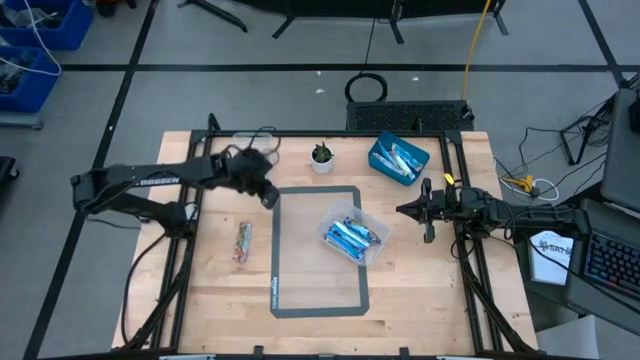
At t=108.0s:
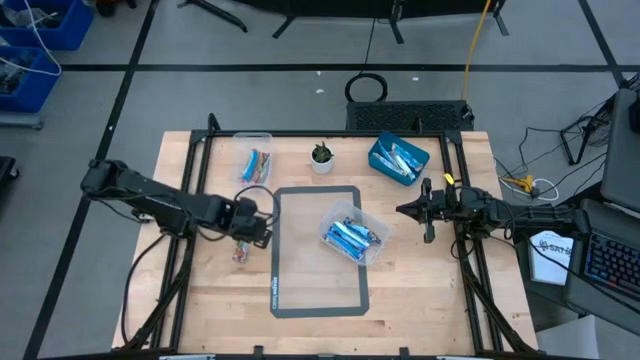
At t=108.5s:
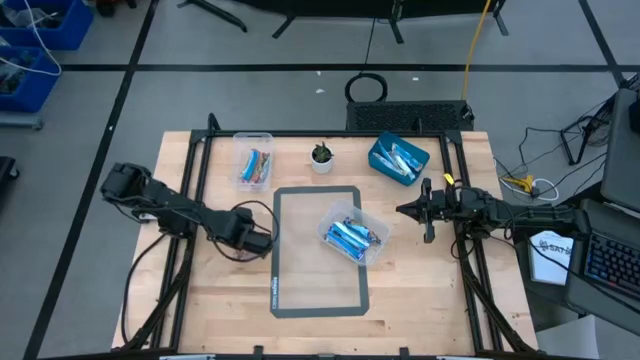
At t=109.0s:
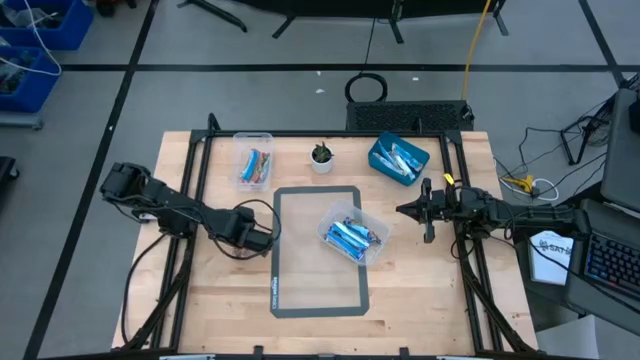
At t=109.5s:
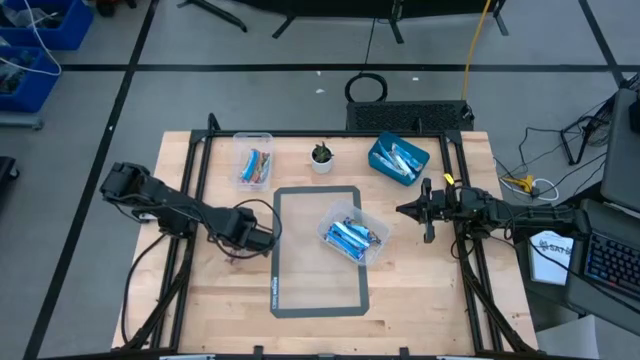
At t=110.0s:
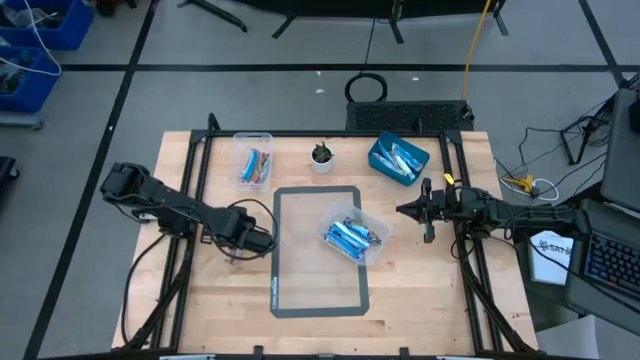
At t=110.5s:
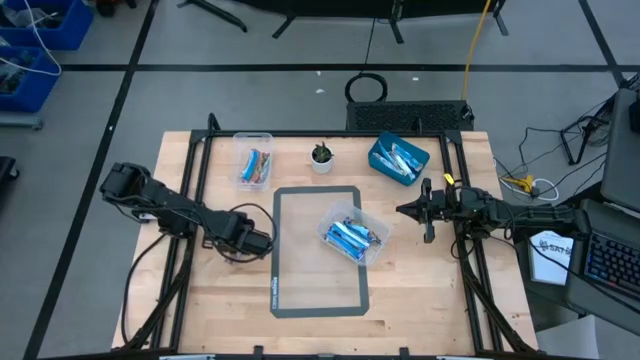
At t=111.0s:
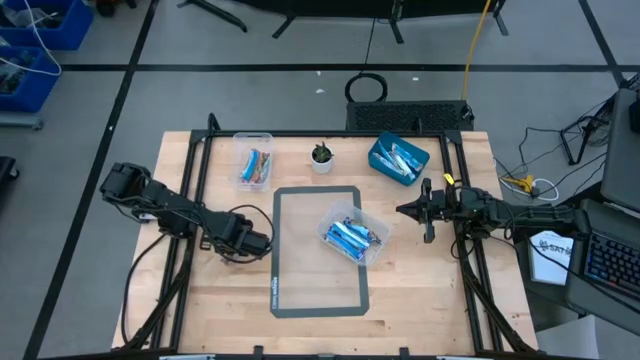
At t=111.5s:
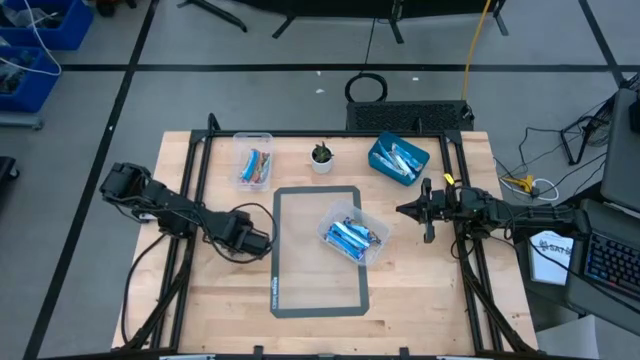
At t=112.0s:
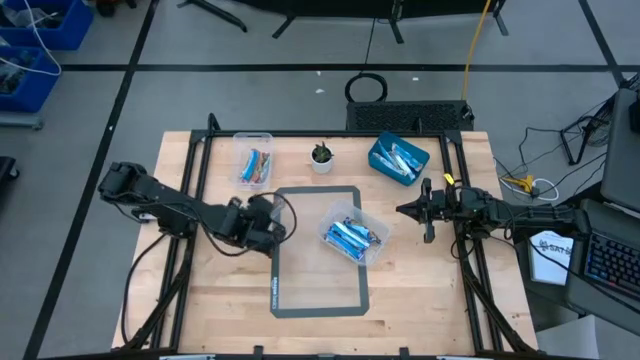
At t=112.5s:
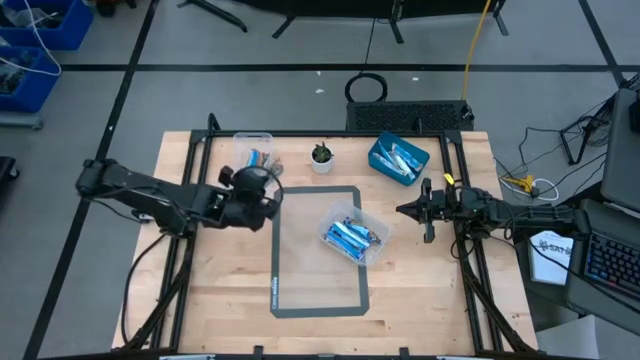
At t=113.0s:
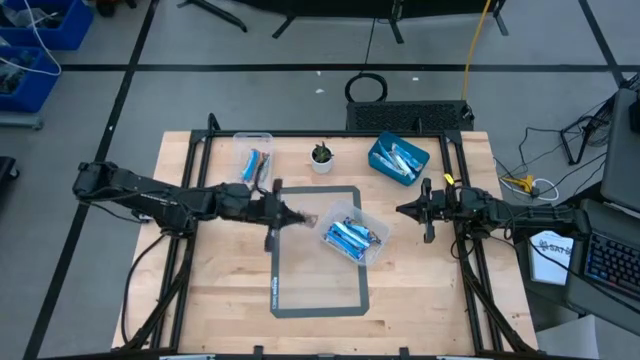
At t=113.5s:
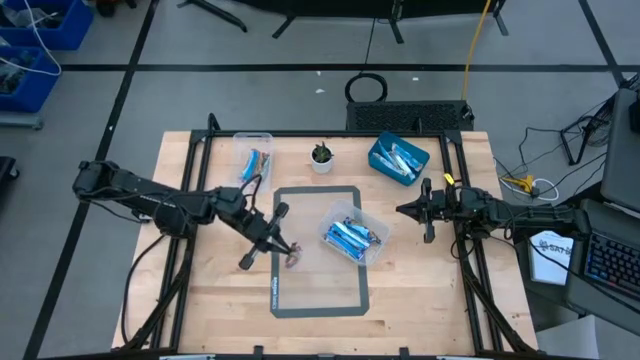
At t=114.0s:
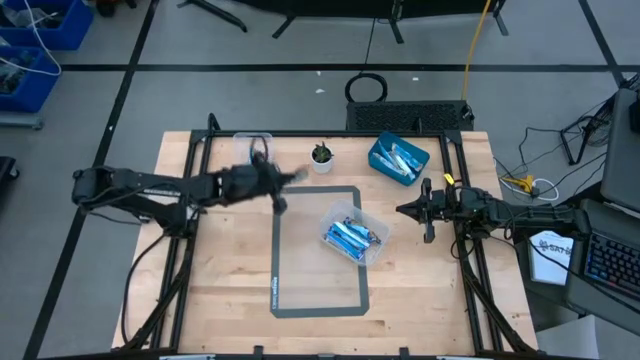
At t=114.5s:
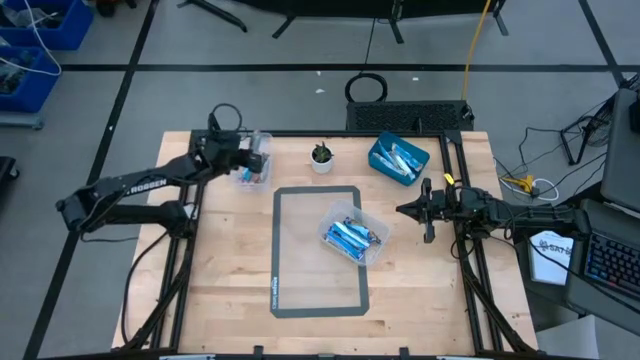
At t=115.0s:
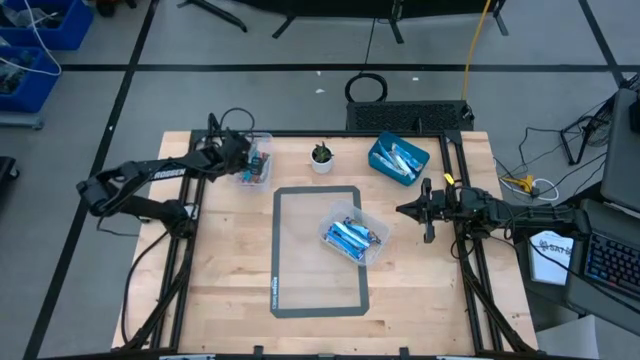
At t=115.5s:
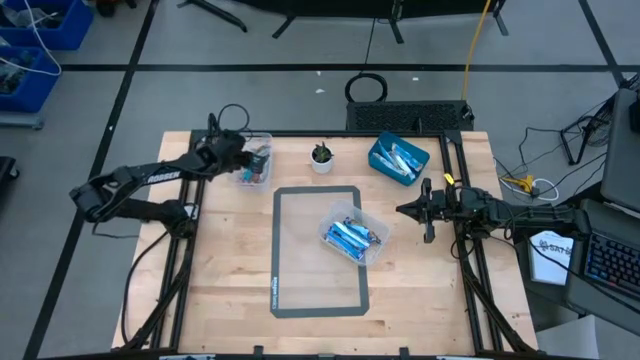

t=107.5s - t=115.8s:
Task: Pick and place Granola Bars by type
Put the snack into the left bin

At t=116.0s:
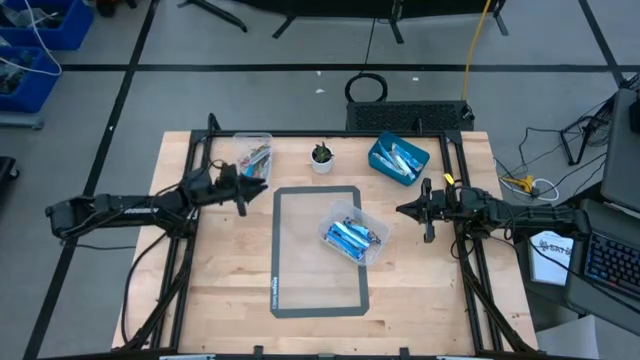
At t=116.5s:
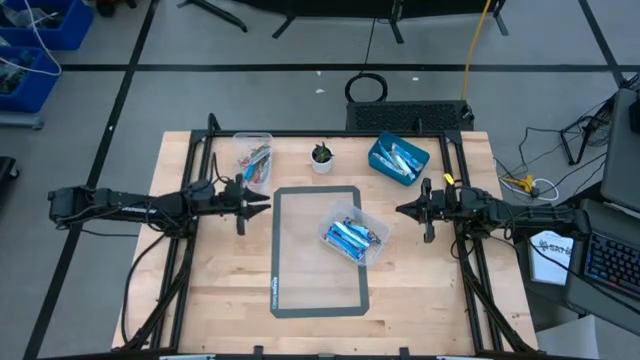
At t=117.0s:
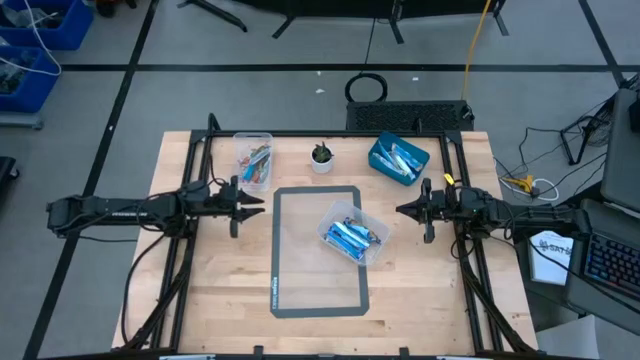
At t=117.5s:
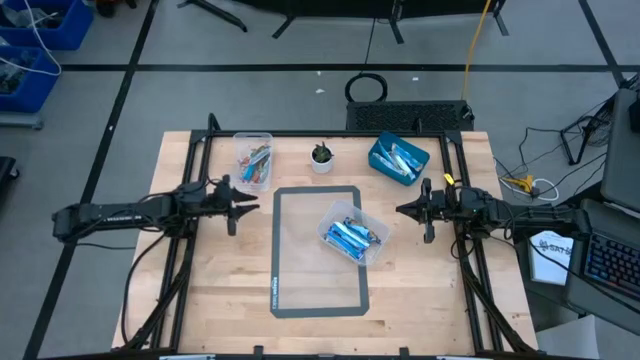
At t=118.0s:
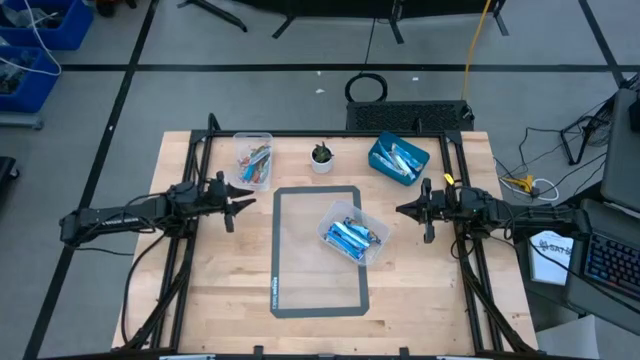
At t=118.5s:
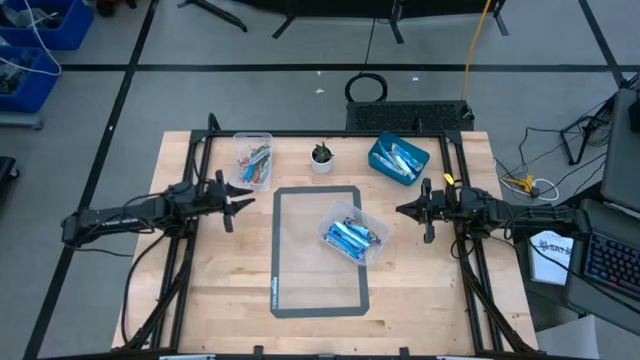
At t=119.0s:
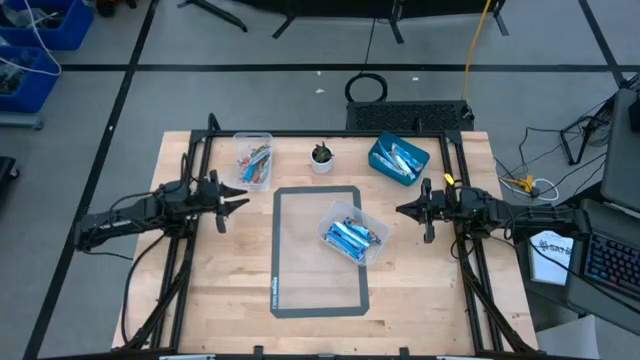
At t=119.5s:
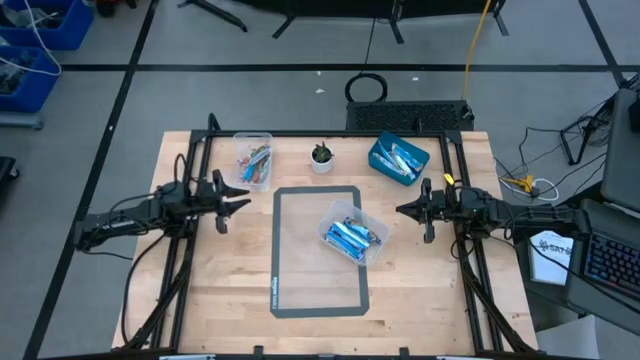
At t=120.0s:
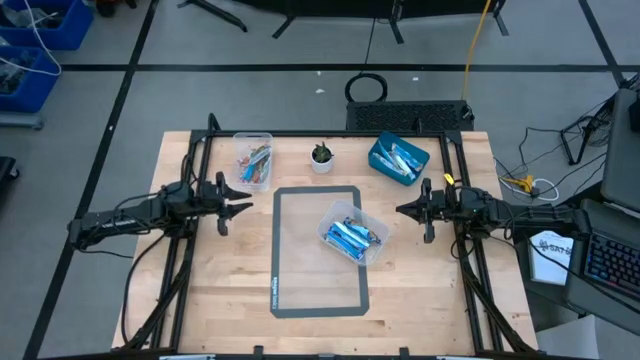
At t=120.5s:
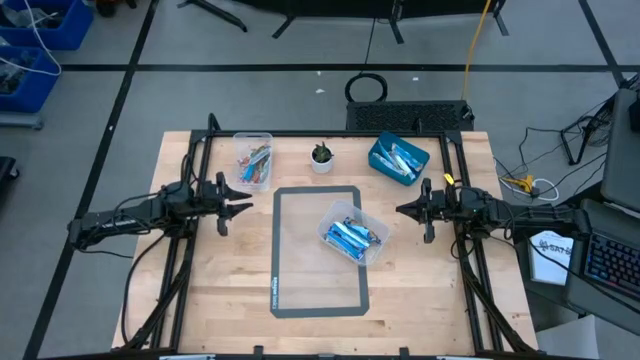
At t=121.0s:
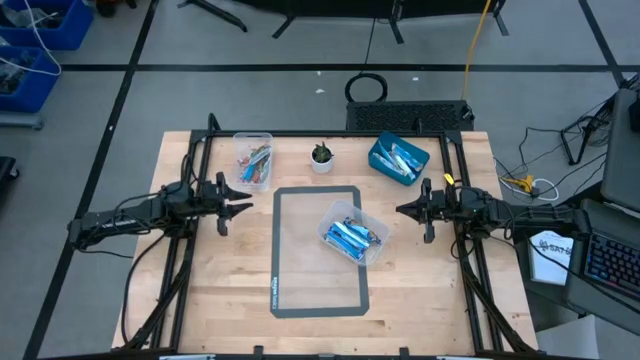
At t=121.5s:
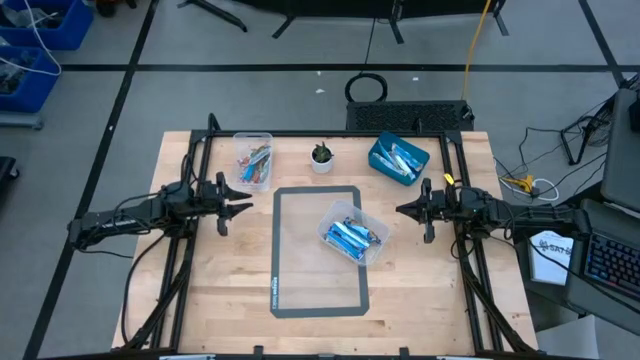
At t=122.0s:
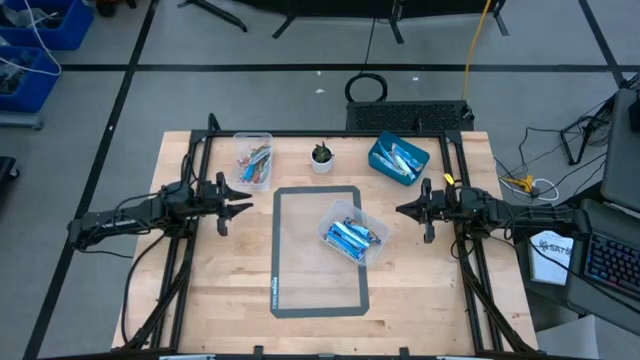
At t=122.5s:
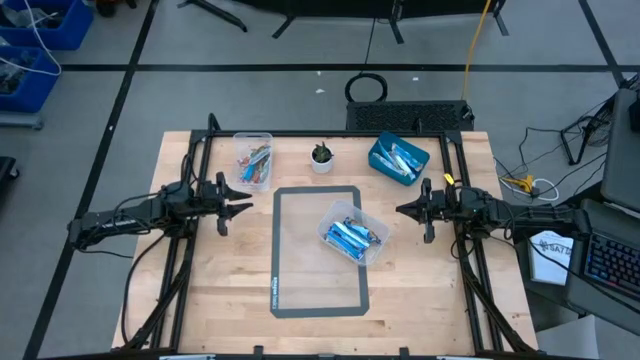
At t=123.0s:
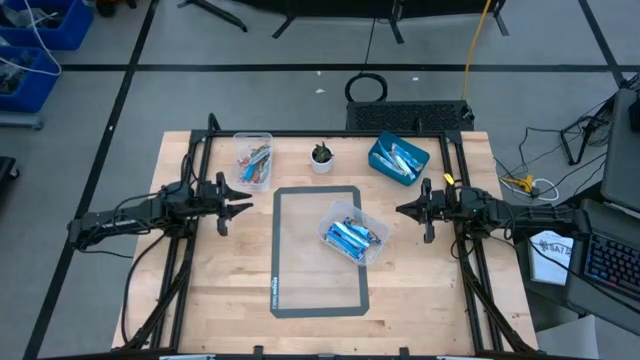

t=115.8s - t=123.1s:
Return to Home Position

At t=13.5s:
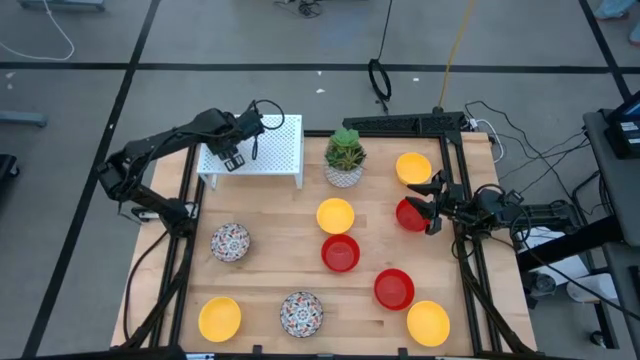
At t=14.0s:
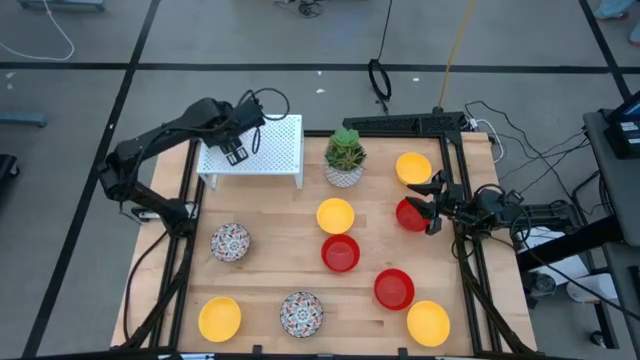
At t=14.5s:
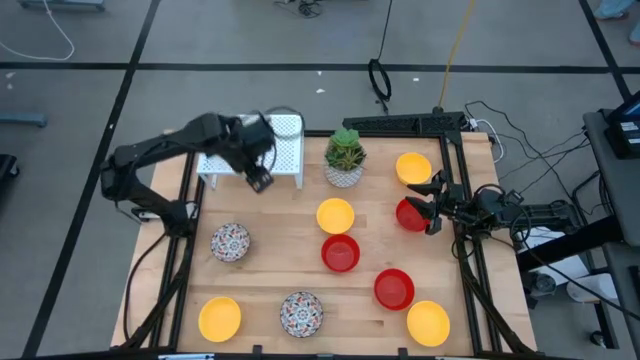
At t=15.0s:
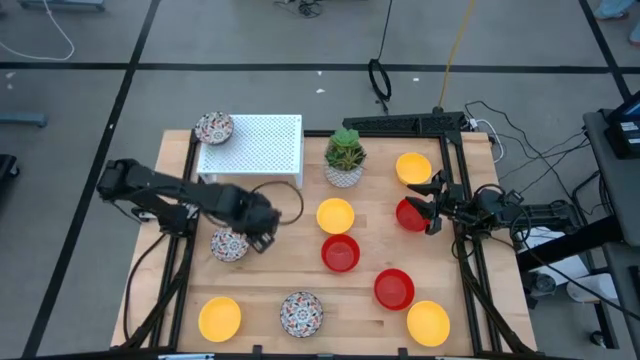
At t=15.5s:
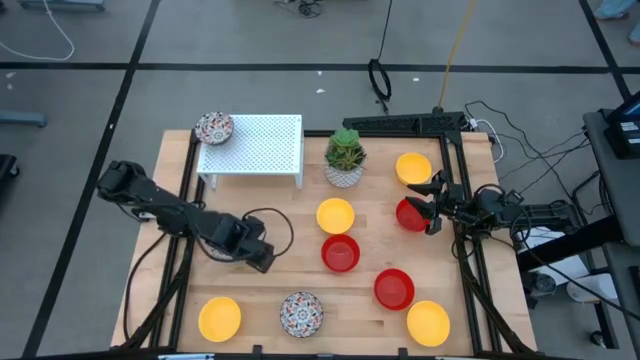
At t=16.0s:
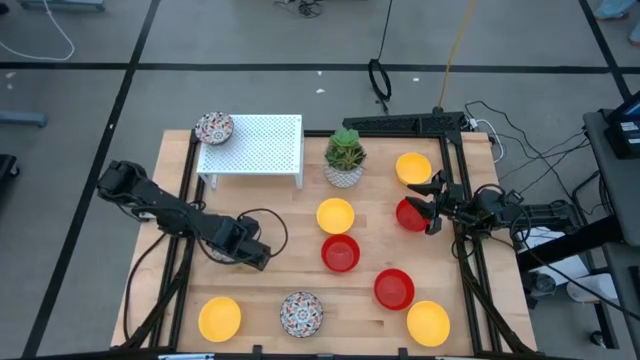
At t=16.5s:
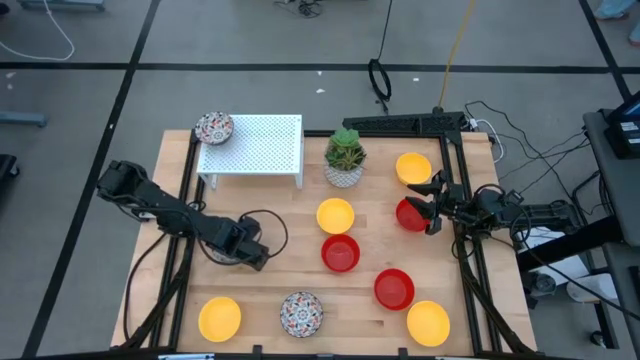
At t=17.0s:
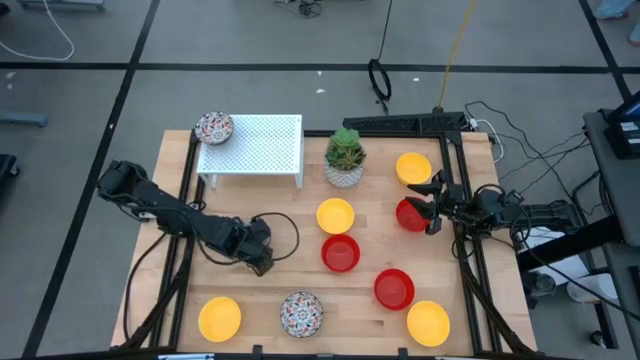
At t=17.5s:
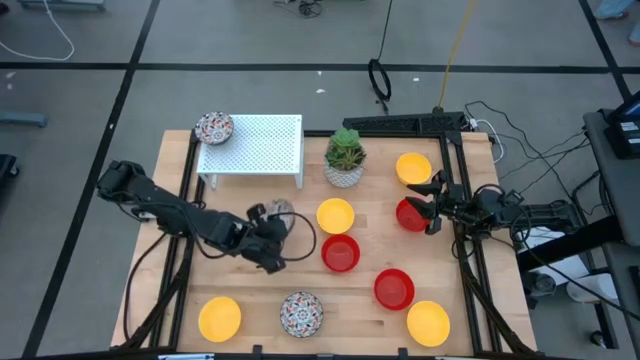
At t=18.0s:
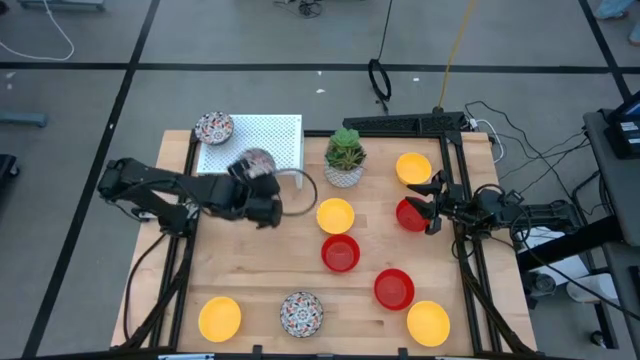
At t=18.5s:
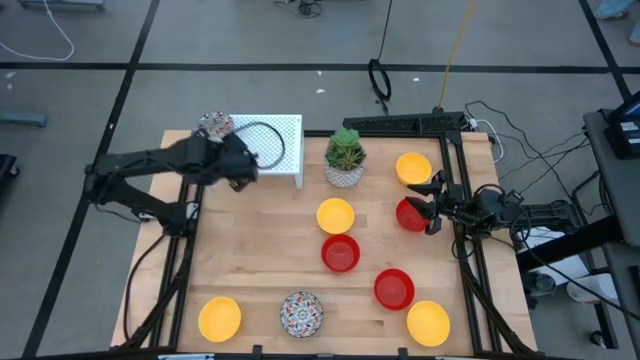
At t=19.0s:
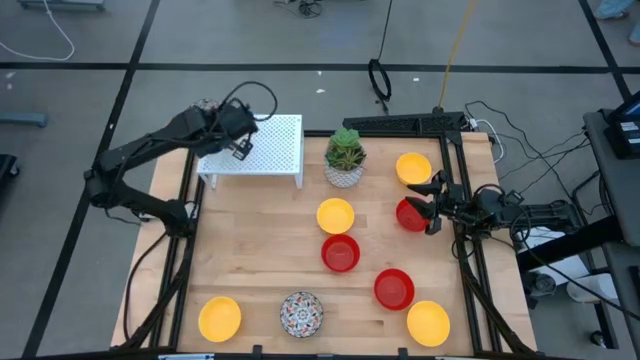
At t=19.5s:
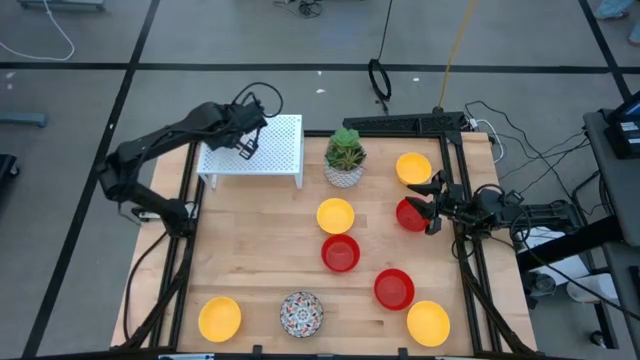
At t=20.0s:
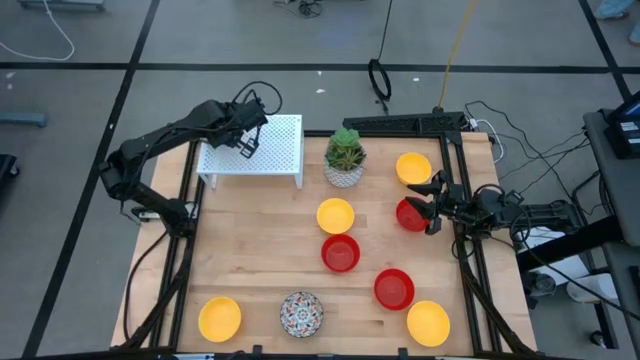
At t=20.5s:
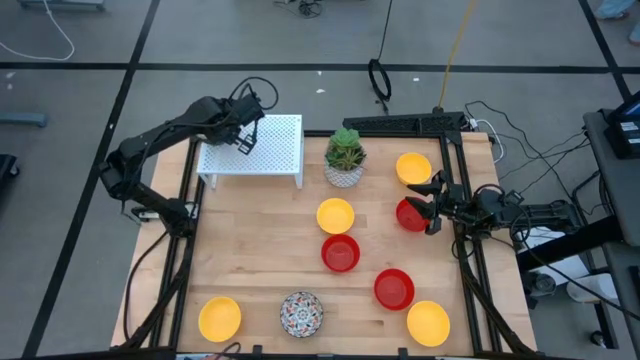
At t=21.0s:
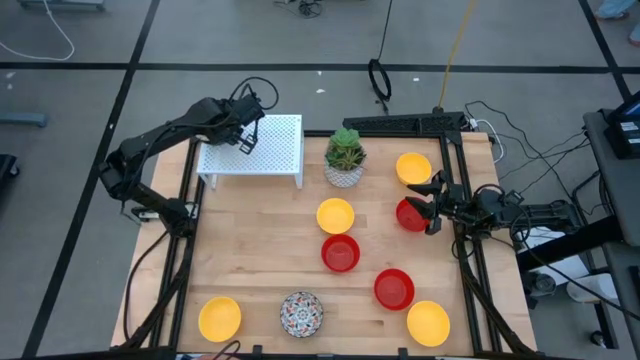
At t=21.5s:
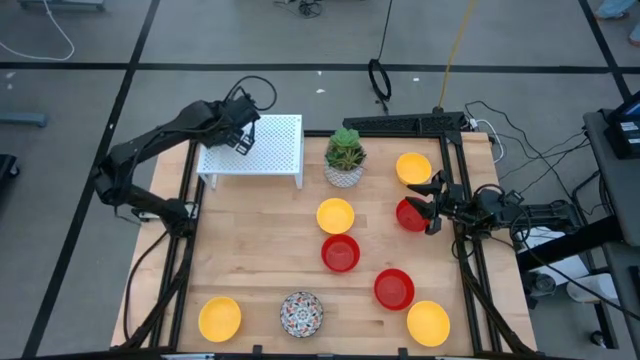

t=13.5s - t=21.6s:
Task: Pick & Place Mini bowls
Stack the orange patterned bowl on top of the orange patterned bowl on the shelf
